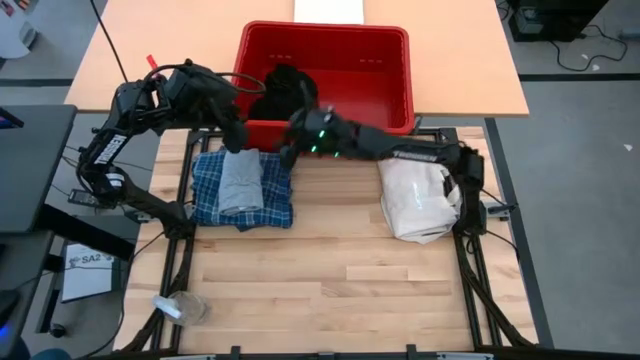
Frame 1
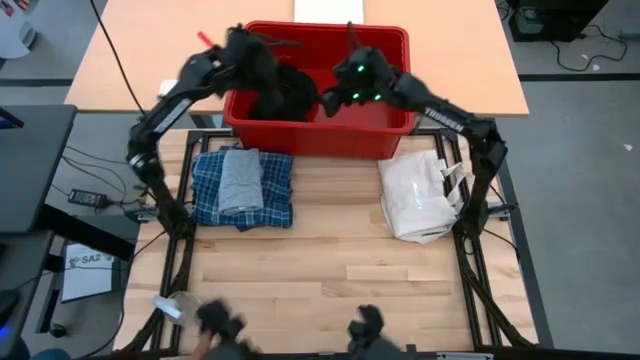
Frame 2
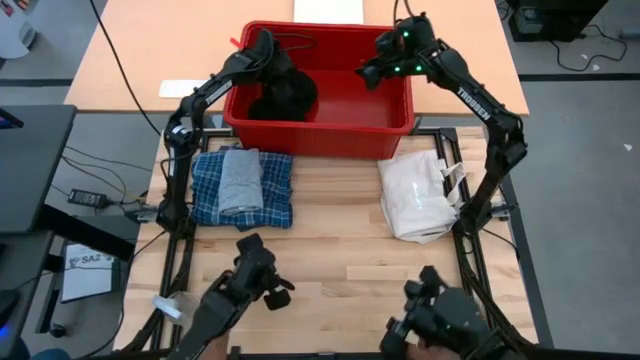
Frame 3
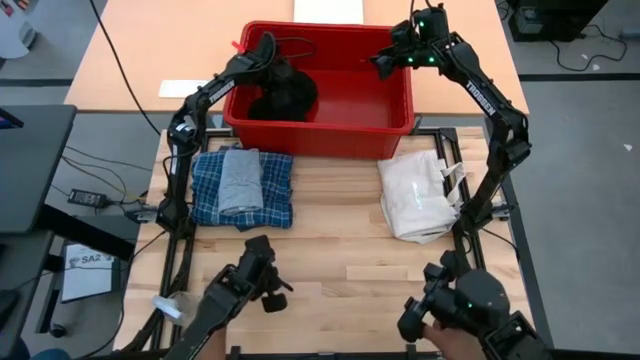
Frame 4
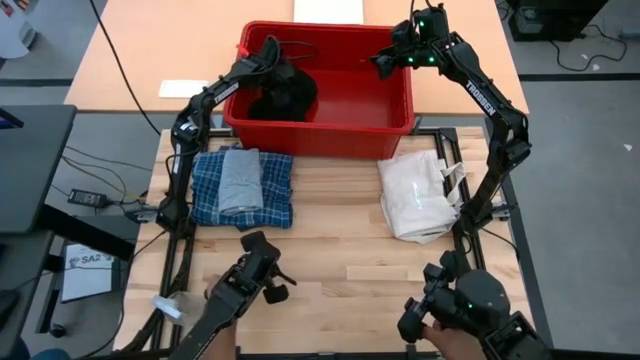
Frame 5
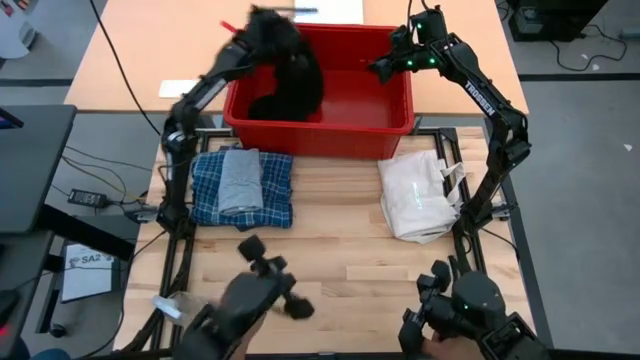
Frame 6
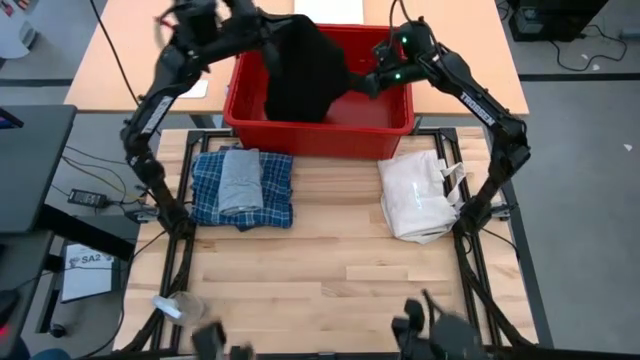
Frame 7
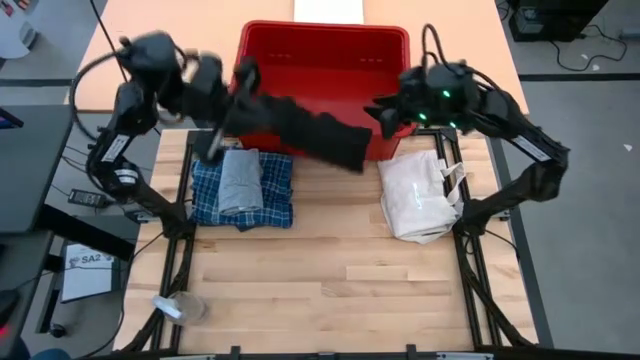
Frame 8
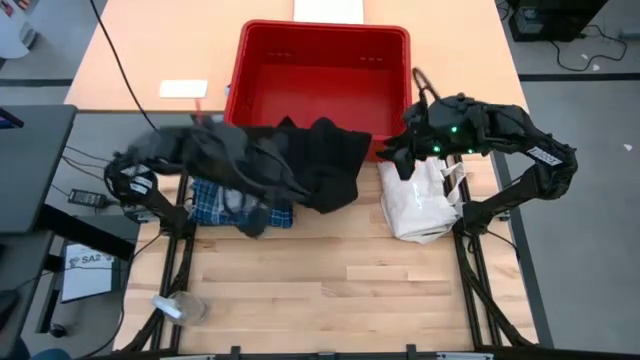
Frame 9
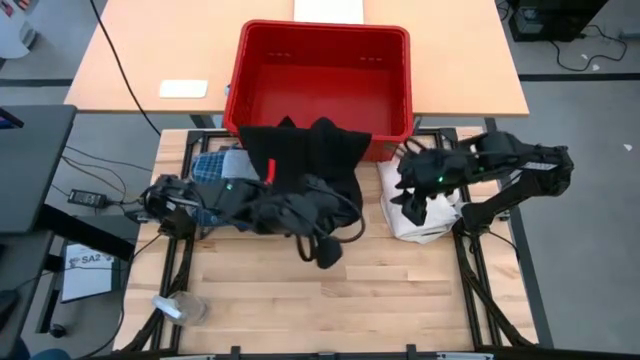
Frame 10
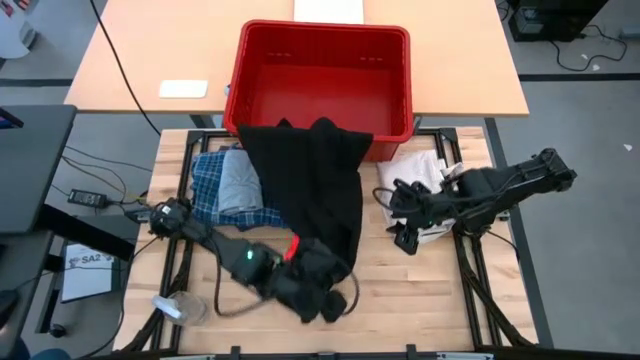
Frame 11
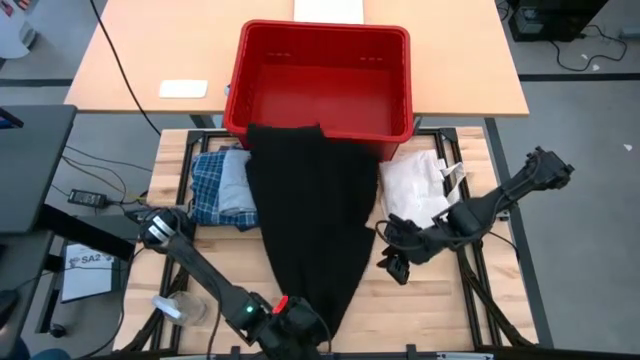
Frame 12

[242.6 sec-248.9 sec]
Task: Fold Laundry from Bin
Remove the black shirt from the laundry bin

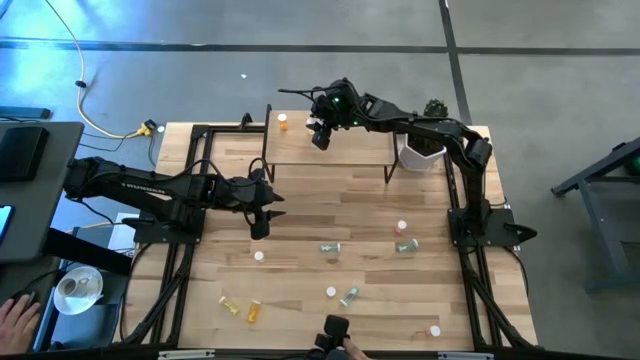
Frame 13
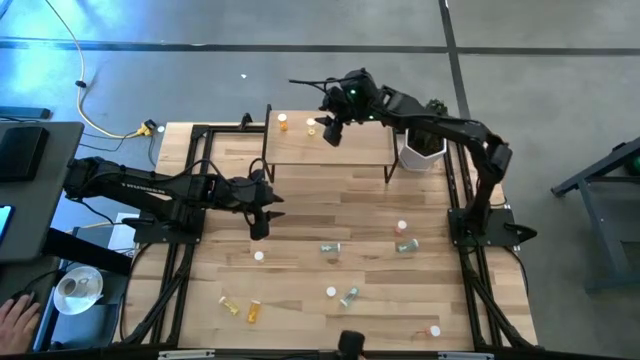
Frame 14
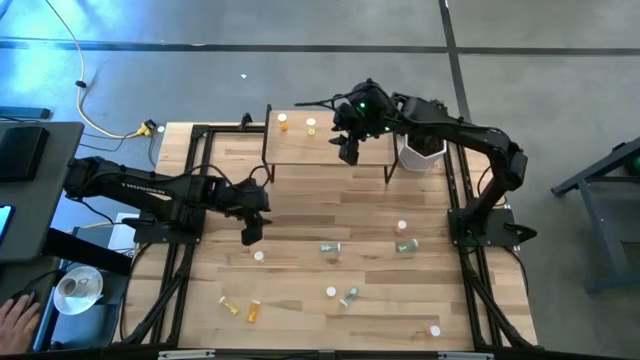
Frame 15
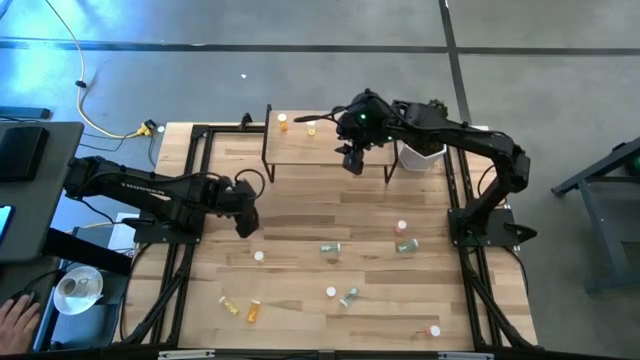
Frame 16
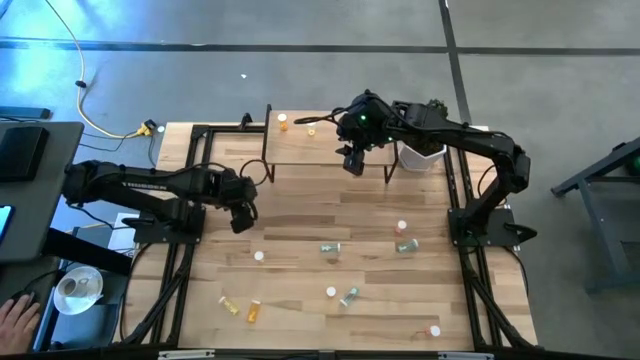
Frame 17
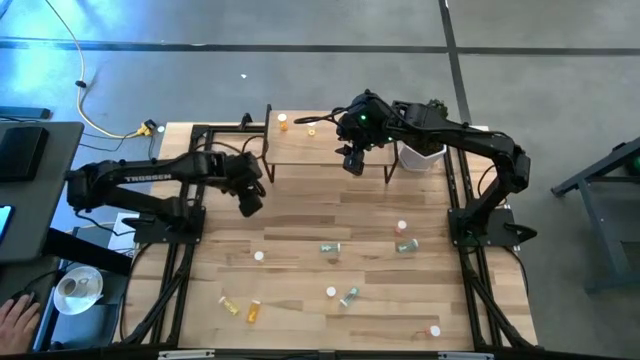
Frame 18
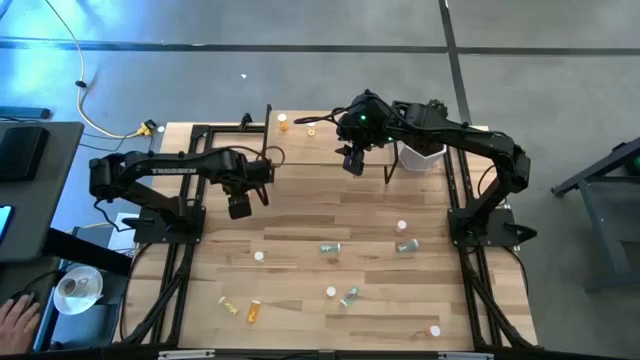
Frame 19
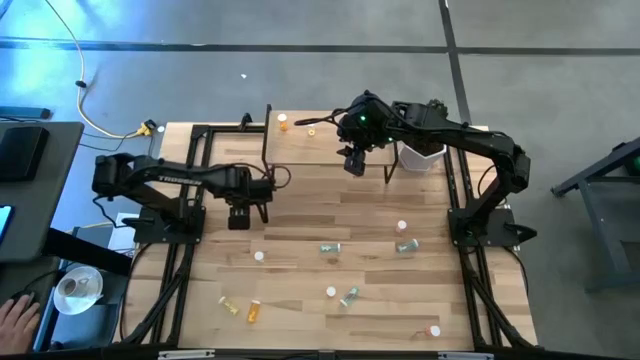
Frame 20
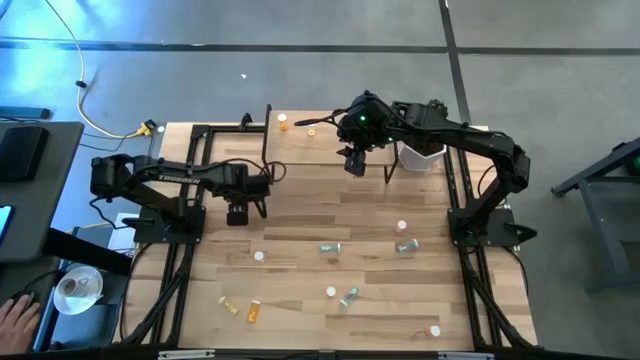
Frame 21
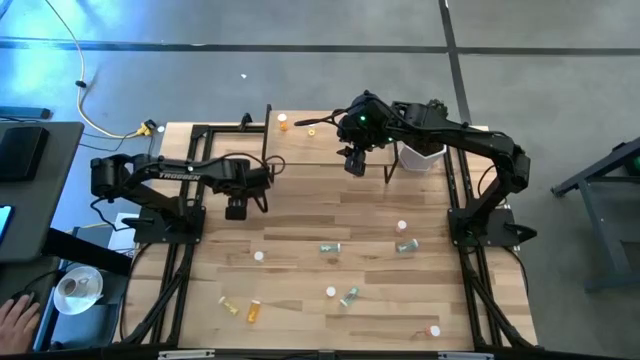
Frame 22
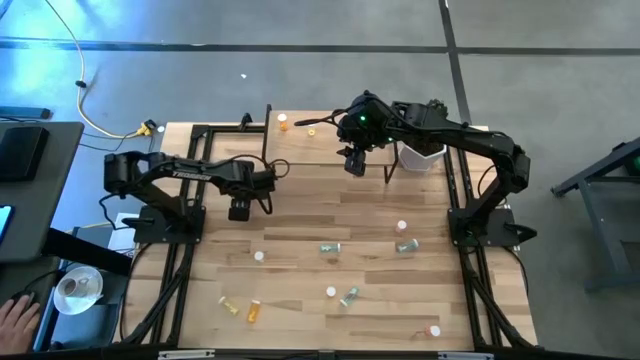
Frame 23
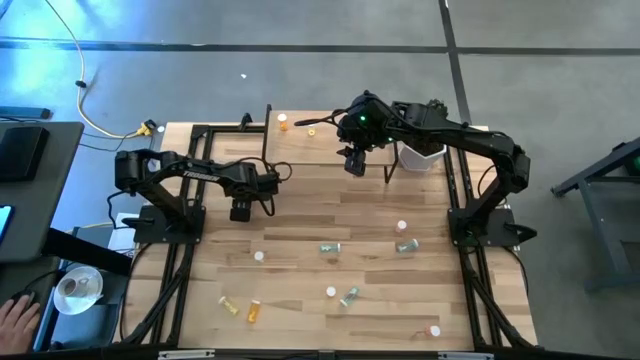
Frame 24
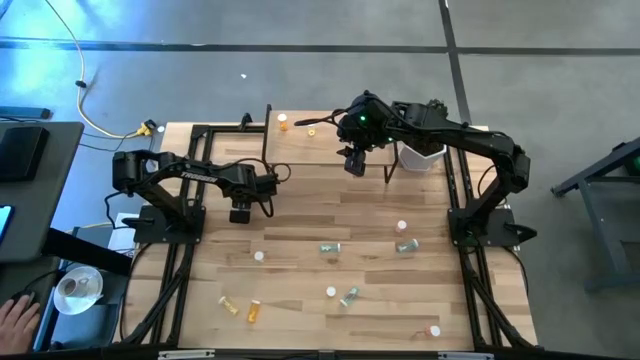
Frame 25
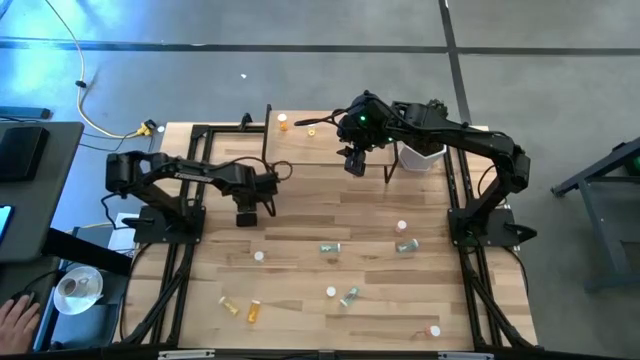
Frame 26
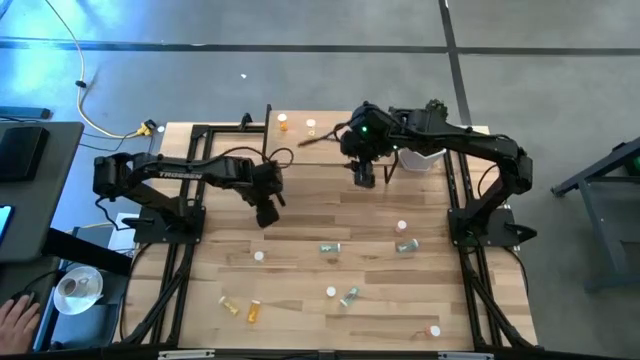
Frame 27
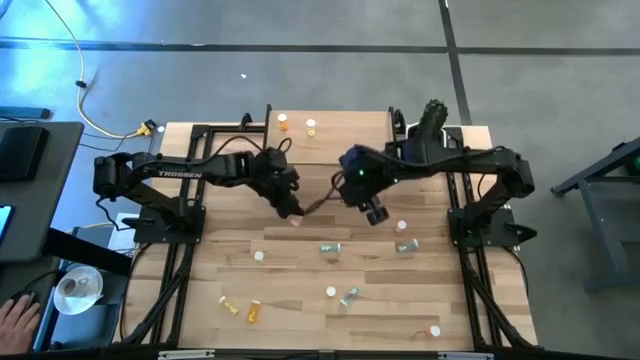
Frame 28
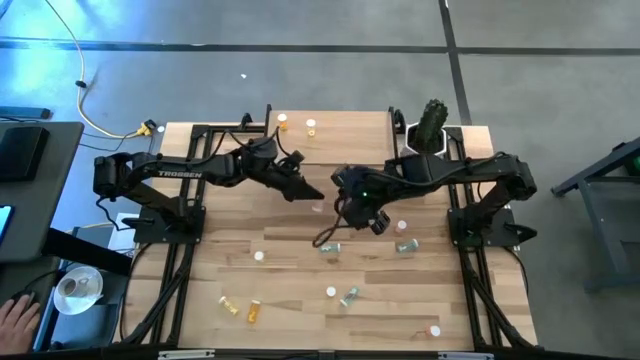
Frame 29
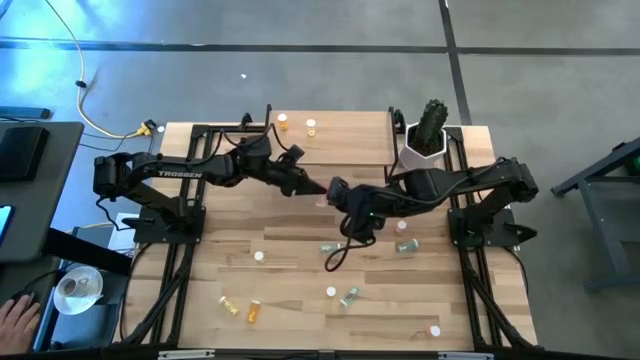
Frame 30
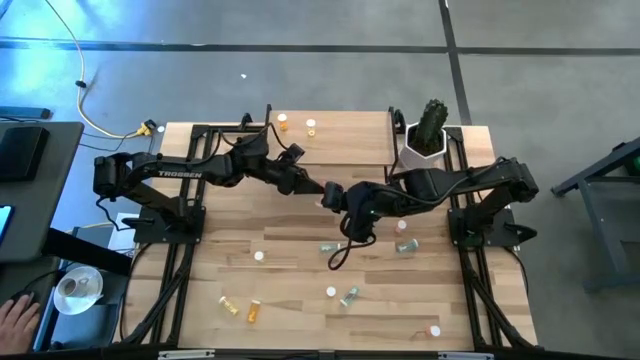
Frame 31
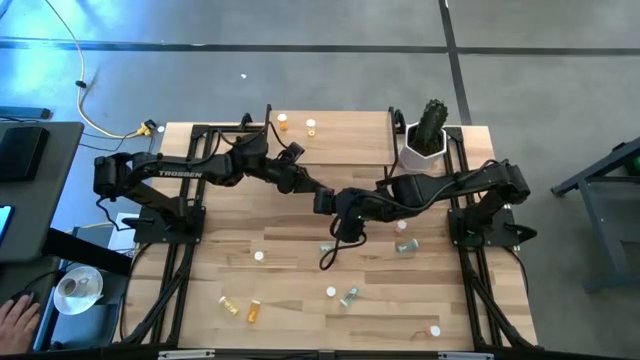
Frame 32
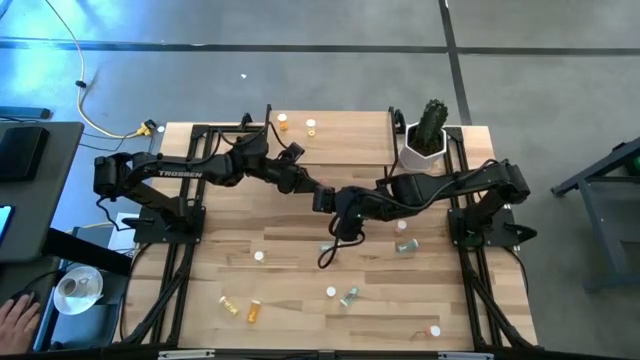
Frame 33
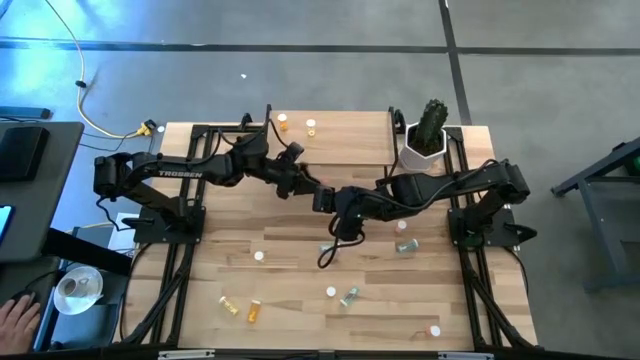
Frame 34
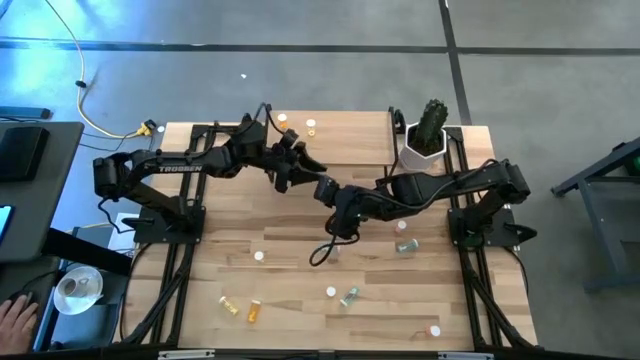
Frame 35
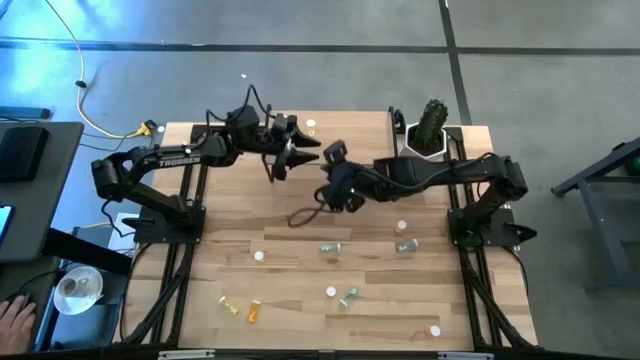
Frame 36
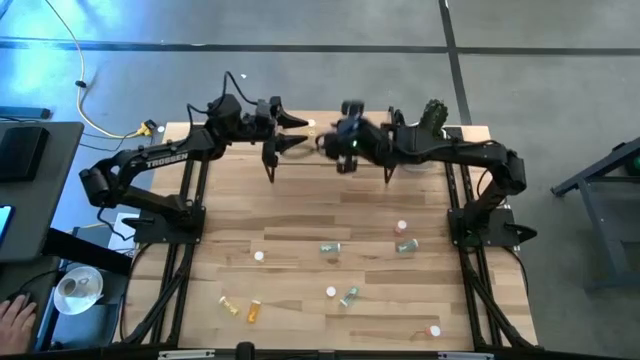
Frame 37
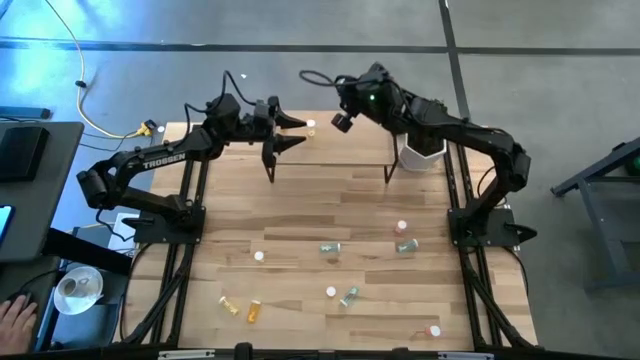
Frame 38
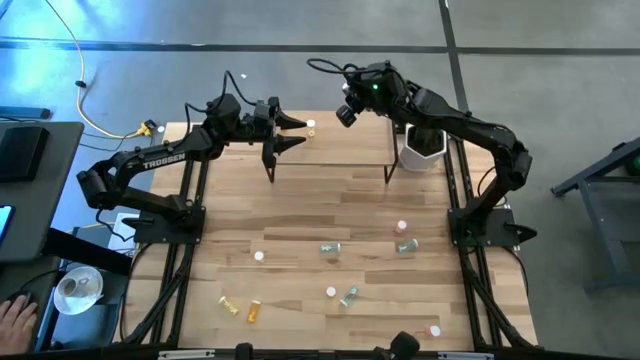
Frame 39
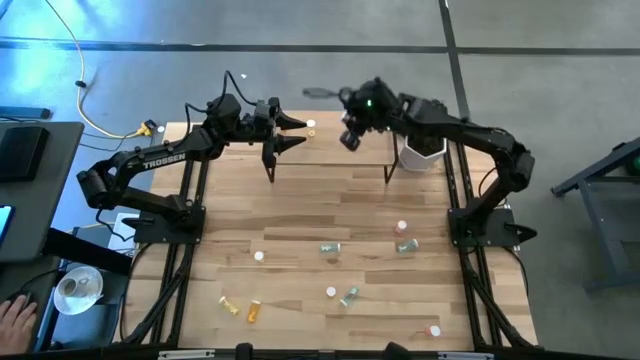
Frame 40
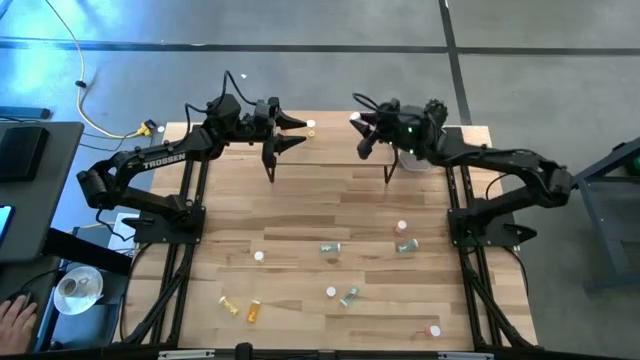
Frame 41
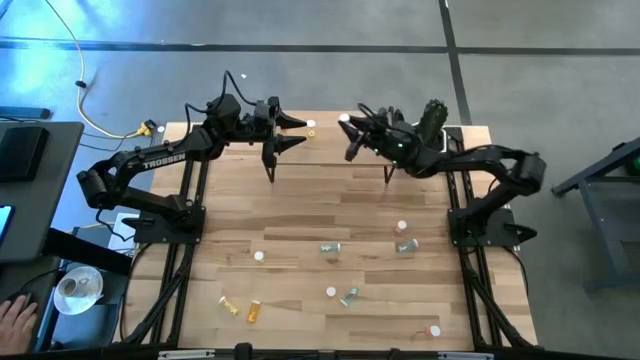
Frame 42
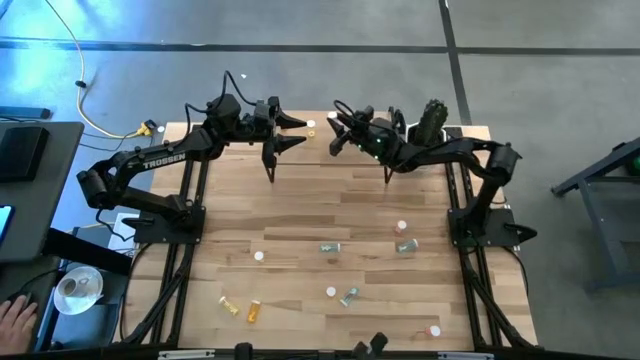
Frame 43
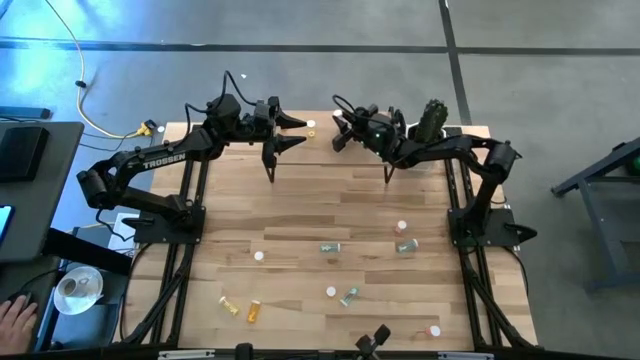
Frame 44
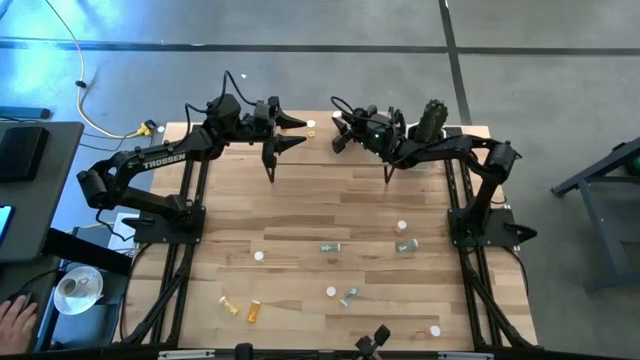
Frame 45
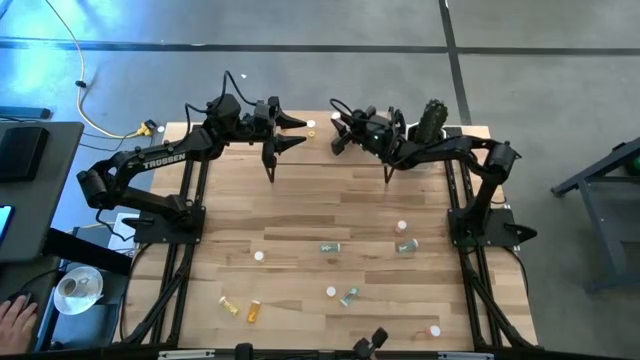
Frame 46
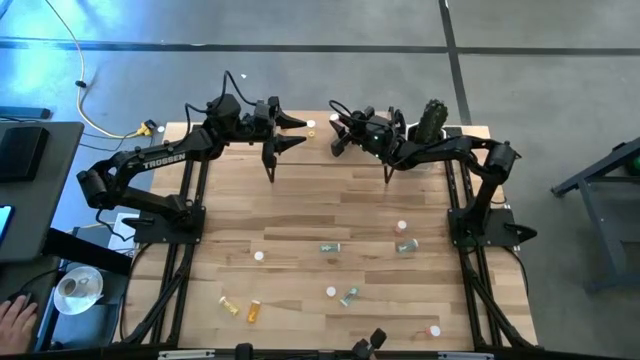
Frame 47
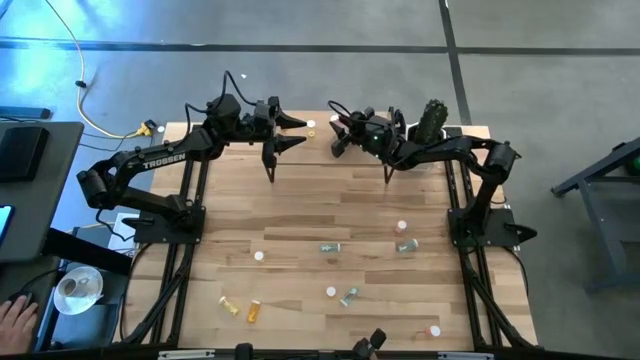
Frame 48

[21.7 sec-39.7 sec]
Task: Pick and place medicine bottles onto shelf by color
Put the top left pink pill bottle on the shelf
